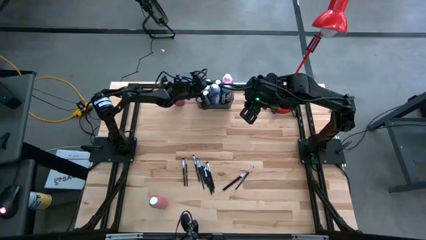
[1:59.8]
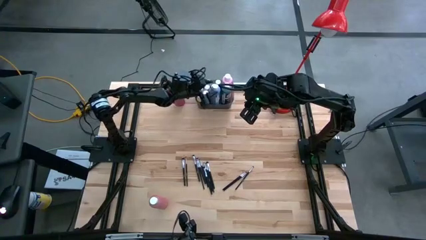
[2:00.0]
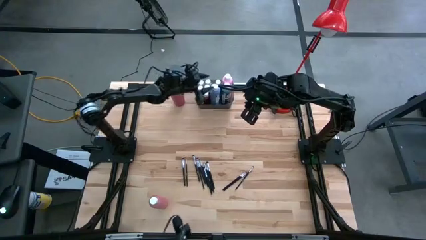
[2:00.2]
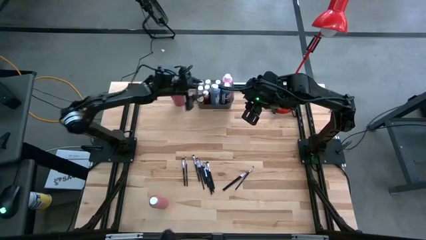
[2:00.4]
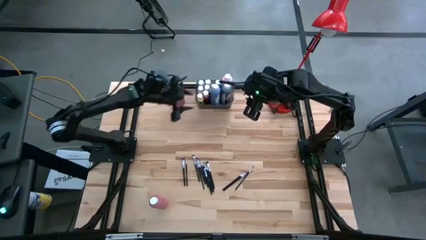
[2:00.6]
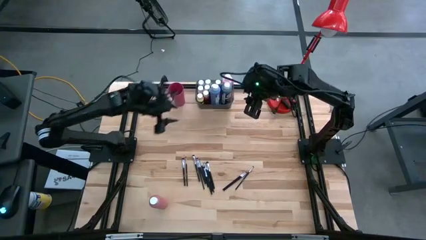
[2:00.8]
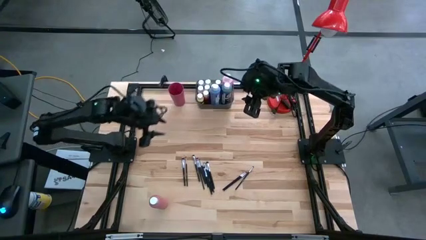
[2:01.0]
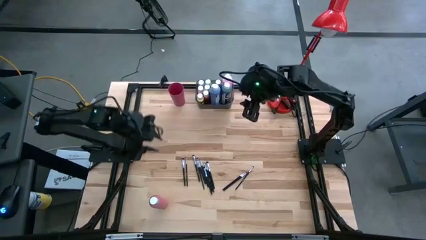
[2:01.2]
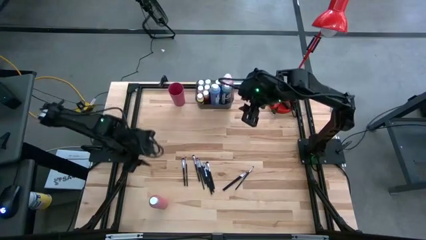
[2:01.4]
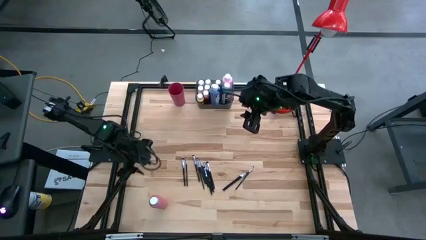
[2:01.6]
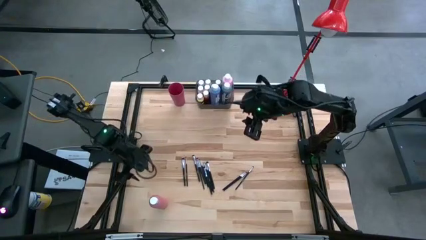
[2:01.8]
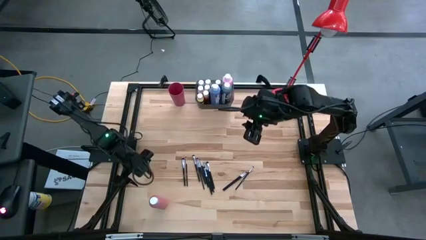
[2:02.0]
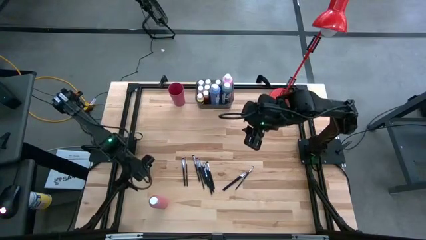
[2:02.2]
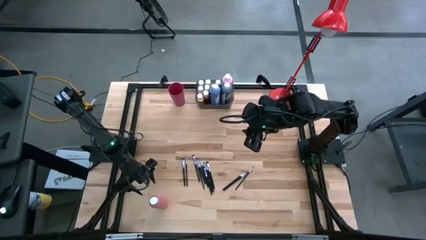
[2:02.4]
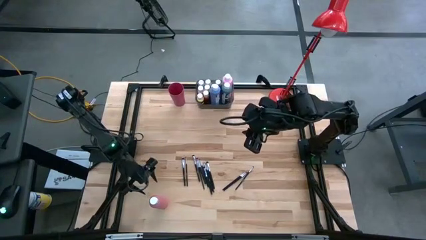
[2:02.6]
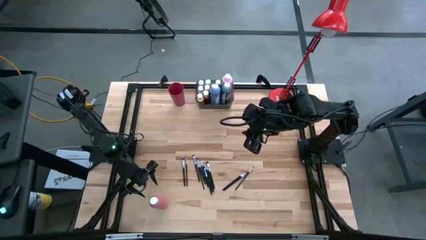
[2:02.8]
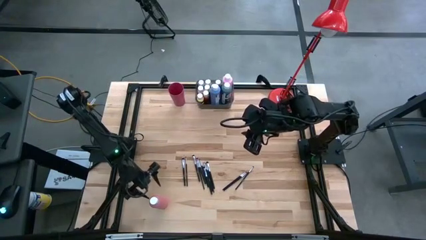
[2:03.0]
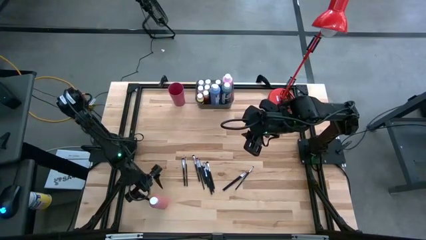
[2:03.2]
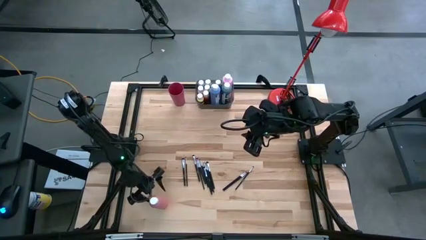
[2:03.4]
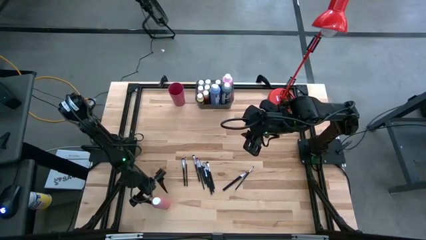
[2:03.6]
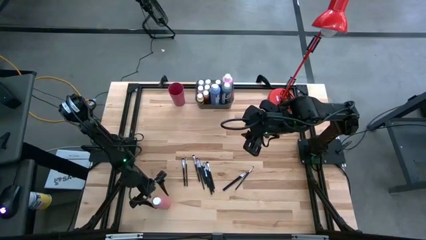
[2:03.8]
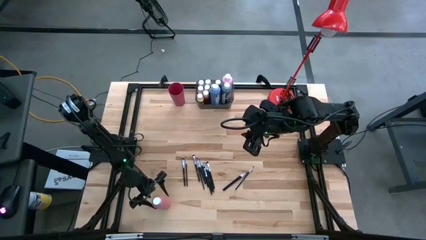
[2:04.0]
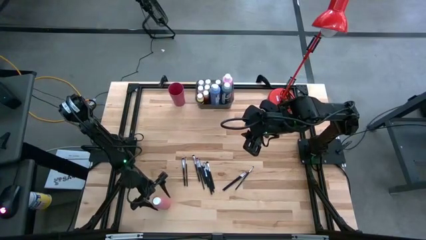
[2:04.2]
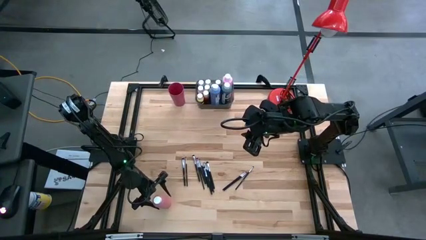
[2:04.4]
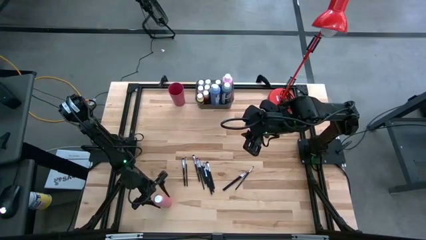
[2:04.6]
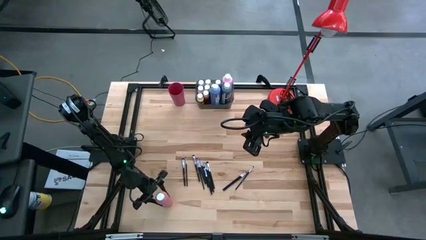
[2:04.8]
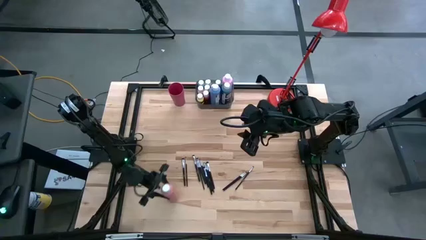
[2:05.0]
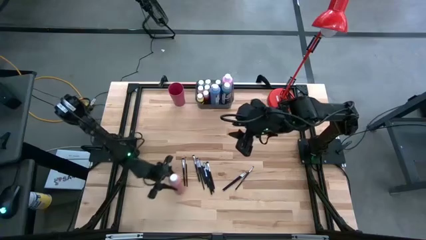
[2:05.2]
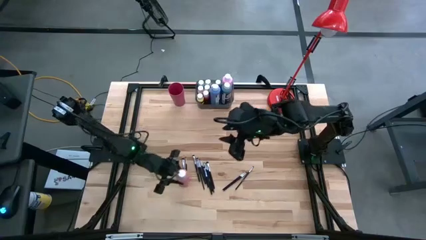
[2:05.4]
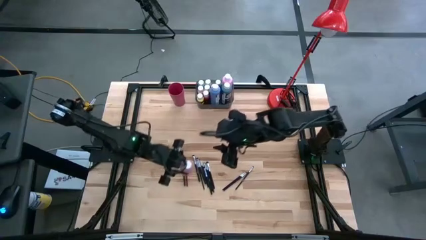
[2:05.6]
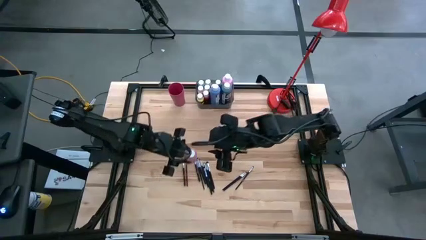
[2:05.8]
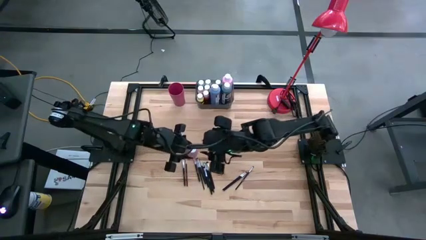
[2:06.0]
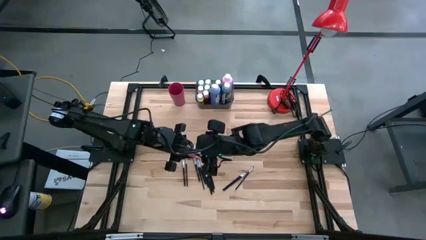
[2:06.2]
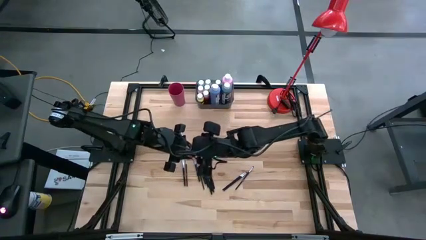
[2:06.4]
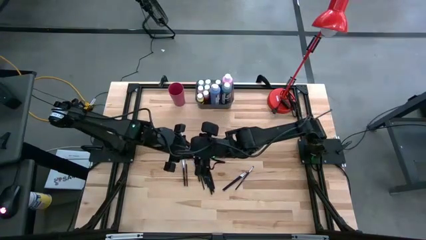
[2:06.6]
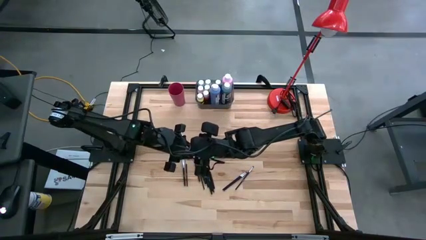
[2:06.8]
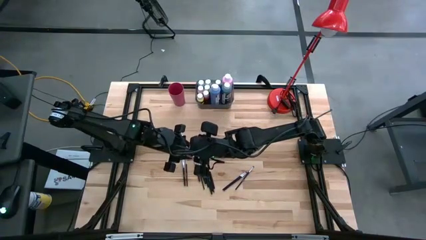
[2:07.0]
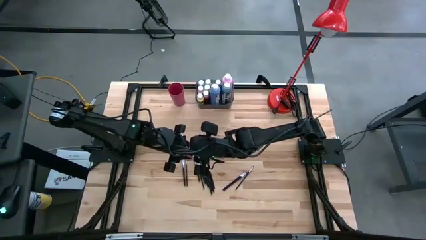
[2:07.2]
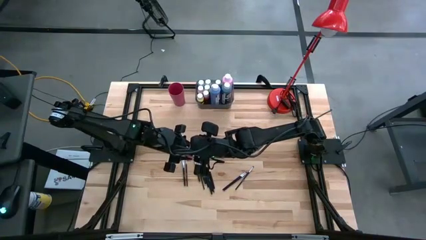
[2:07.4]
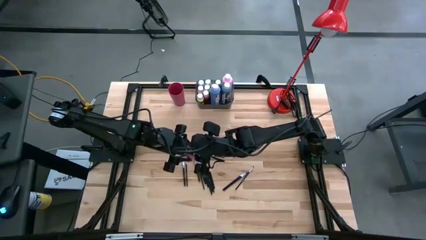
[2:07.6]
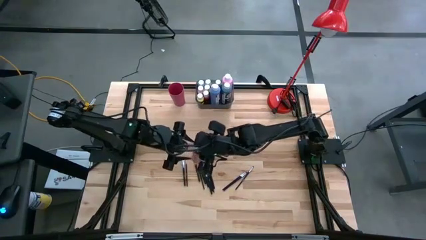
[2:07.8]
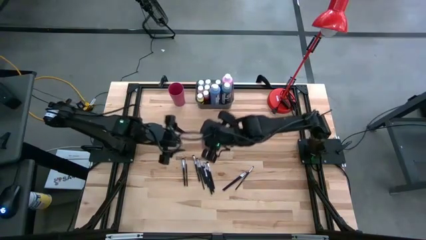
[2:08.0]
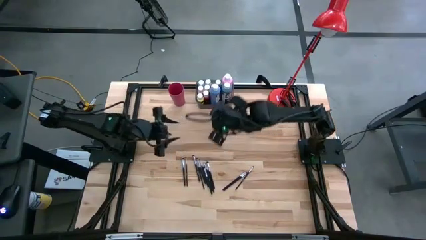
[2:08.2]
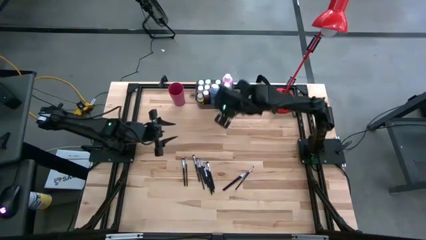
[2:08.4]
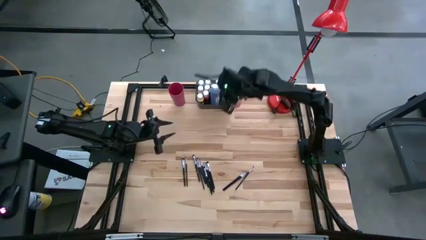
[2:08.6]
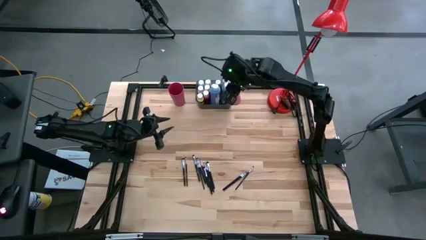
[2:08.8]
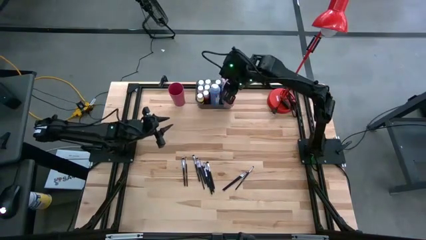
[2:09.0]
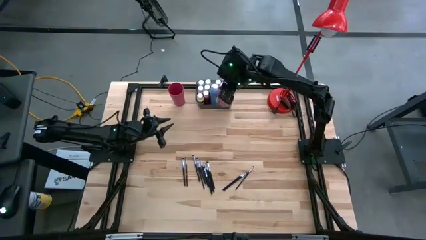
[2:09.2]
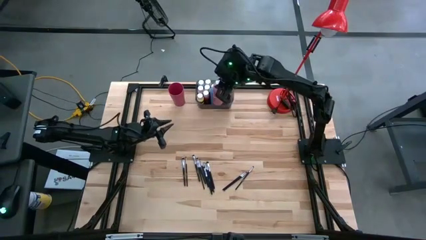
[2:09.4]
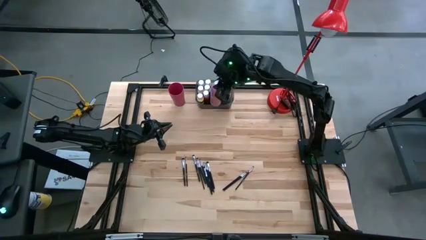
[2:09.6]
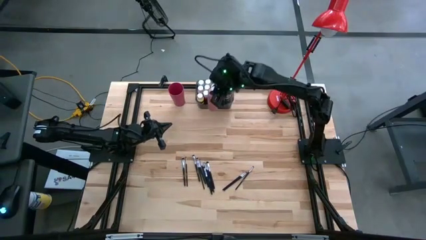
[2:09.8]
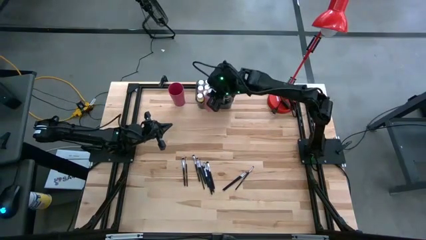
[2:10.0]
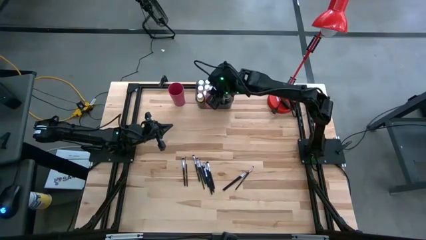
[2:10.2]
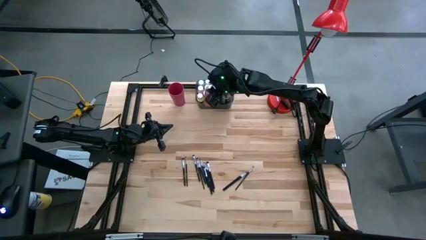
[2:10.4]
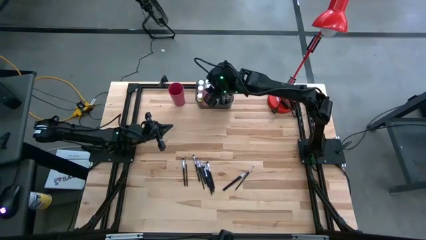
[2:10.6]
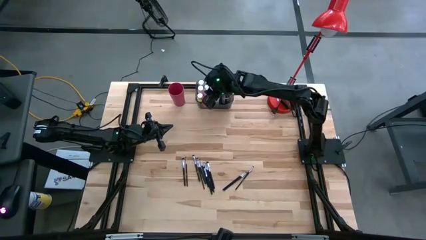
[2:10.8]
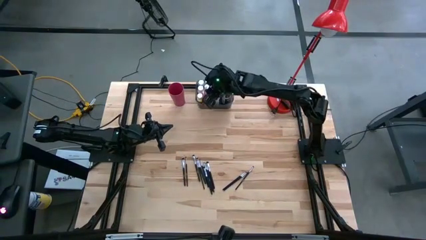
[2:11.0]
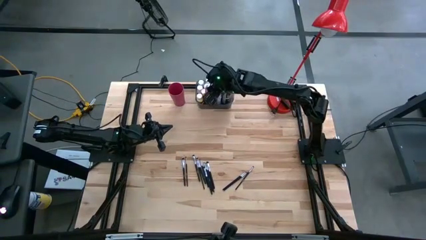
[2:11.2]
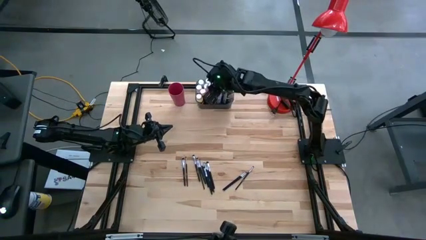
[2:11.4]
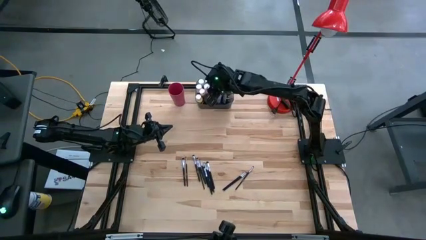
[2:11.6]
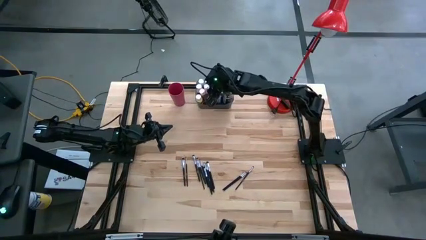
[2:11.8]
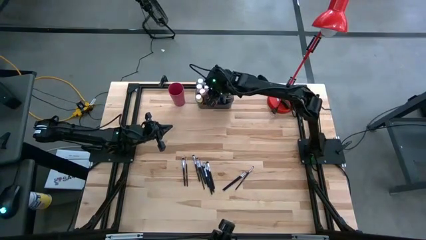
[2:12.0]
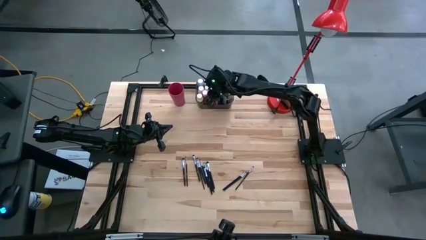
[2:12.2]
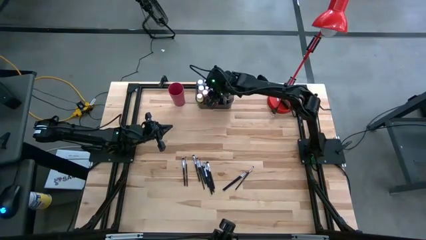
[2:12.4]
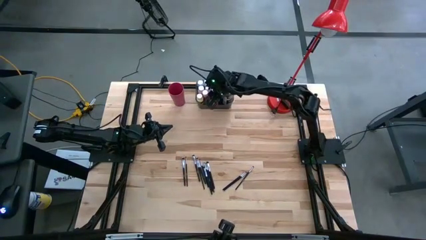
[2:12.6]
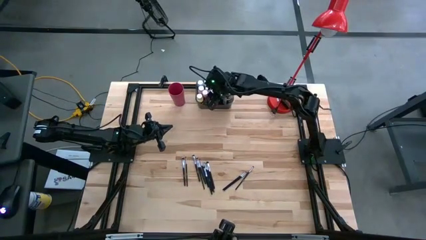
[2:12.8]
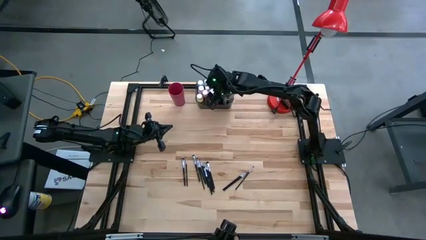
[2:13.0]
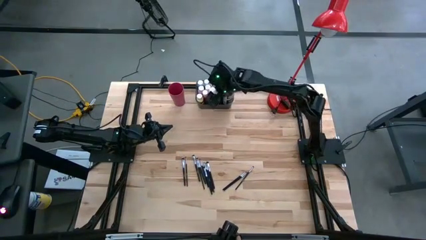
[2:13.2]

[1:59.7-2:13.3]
Task: Pick & Place Paint Supplies
Put the pink paint bottle into the black bin
